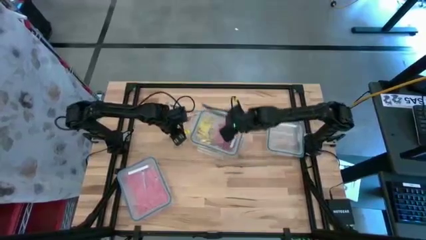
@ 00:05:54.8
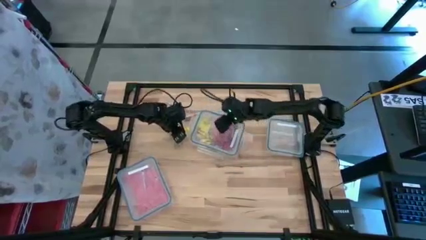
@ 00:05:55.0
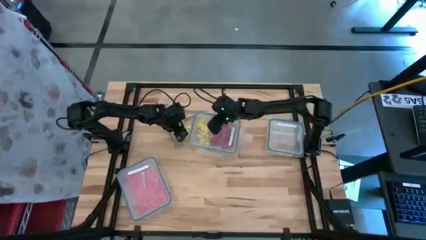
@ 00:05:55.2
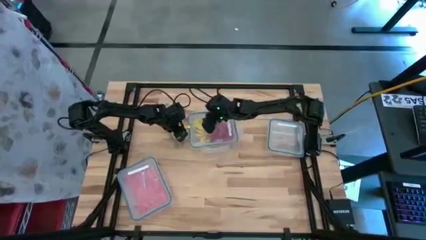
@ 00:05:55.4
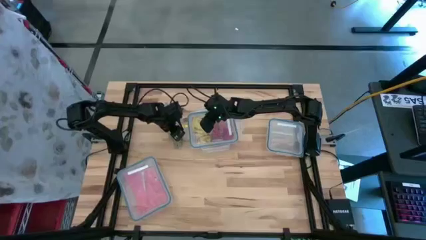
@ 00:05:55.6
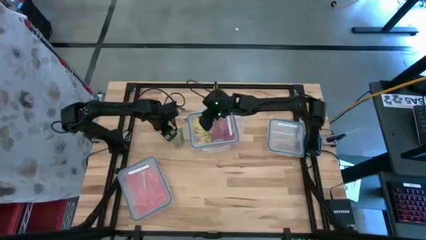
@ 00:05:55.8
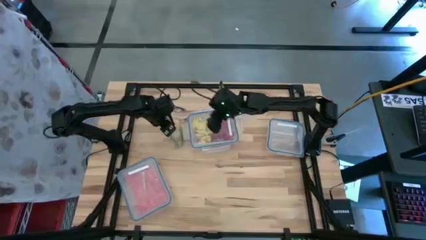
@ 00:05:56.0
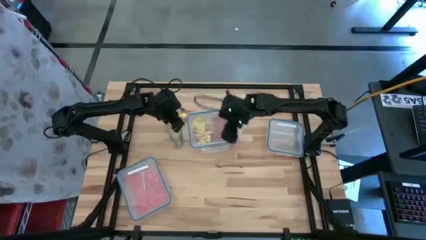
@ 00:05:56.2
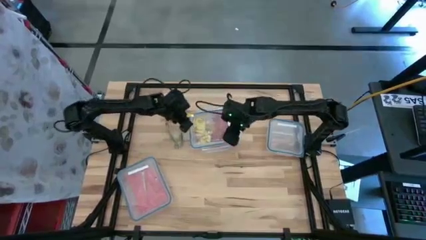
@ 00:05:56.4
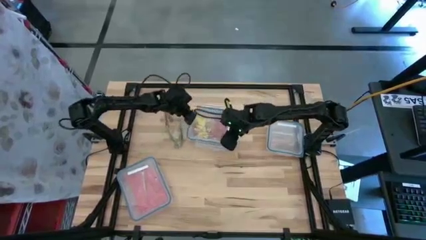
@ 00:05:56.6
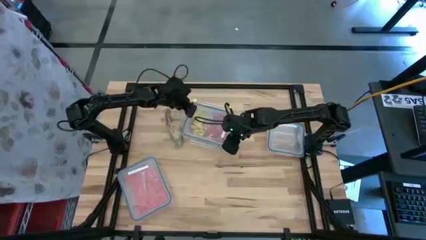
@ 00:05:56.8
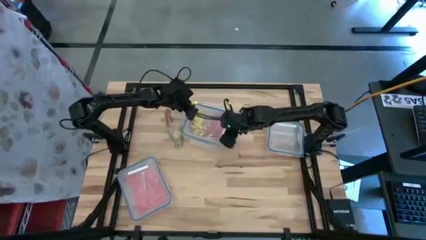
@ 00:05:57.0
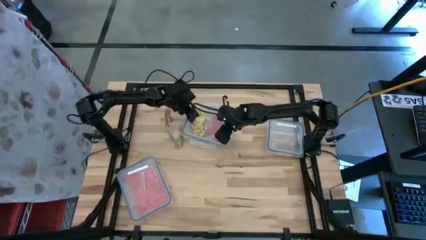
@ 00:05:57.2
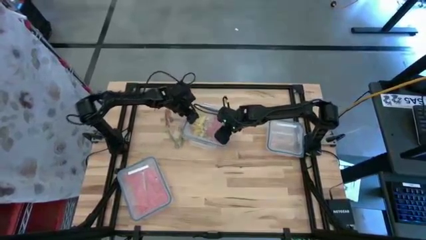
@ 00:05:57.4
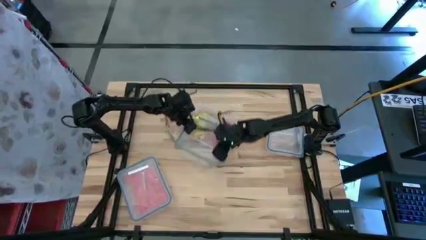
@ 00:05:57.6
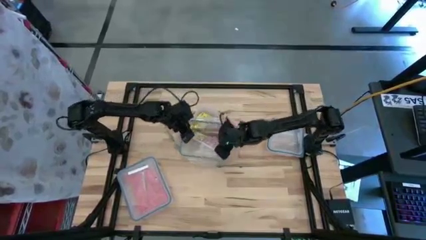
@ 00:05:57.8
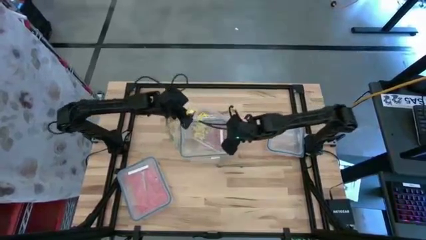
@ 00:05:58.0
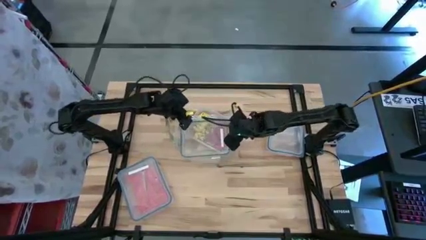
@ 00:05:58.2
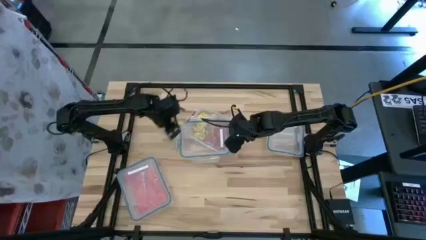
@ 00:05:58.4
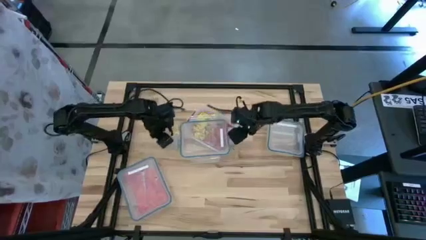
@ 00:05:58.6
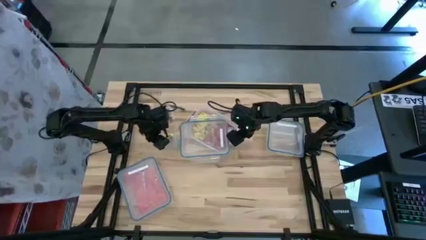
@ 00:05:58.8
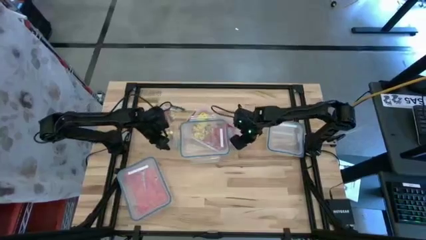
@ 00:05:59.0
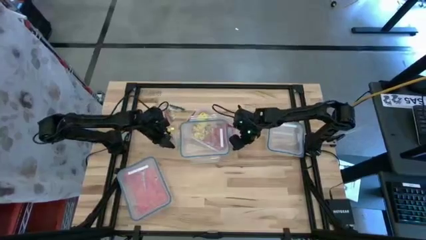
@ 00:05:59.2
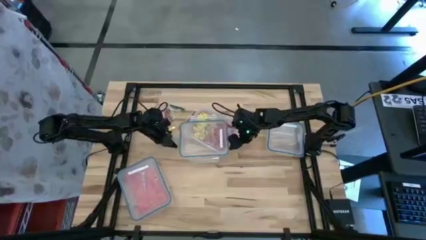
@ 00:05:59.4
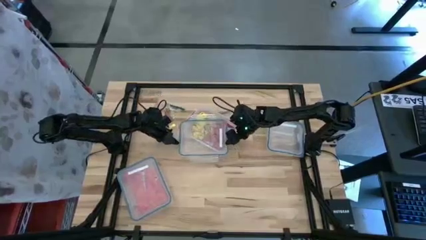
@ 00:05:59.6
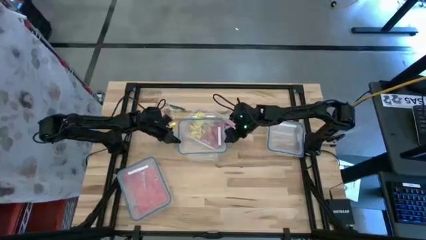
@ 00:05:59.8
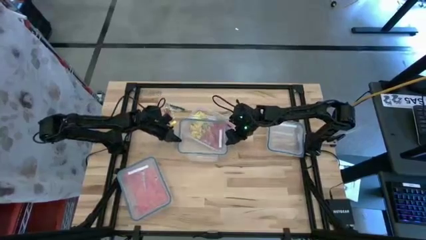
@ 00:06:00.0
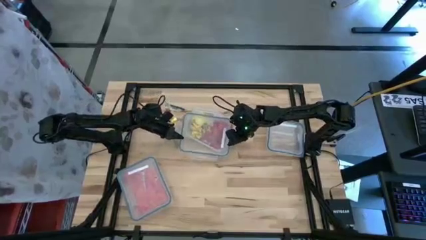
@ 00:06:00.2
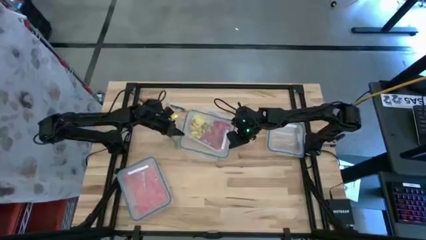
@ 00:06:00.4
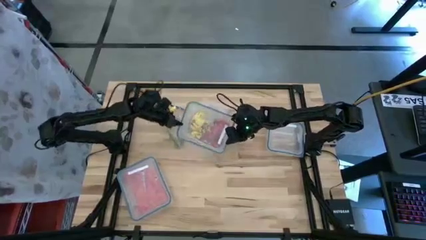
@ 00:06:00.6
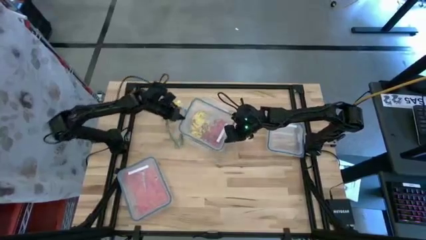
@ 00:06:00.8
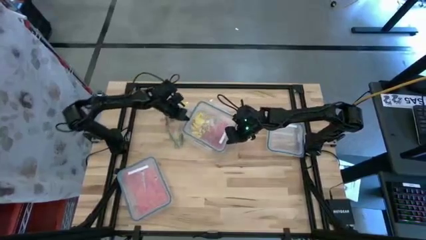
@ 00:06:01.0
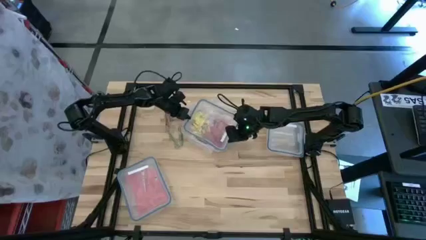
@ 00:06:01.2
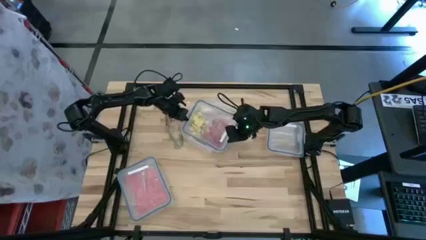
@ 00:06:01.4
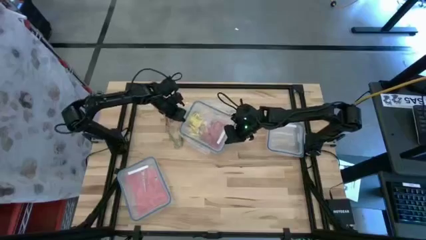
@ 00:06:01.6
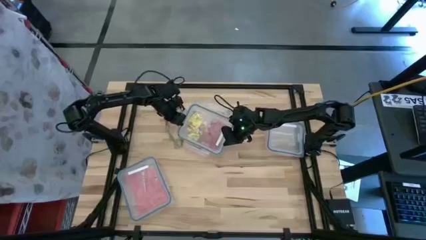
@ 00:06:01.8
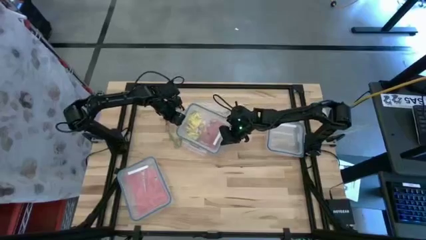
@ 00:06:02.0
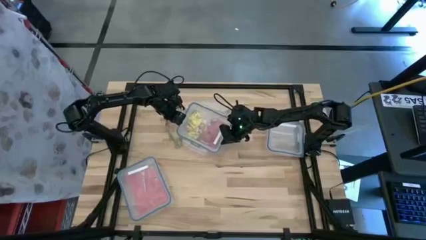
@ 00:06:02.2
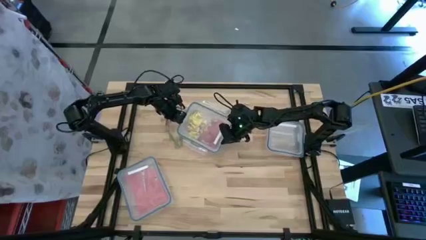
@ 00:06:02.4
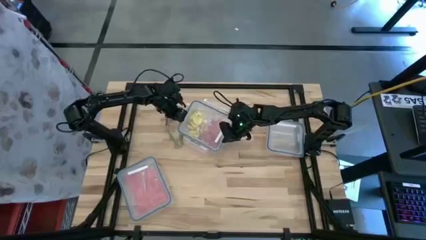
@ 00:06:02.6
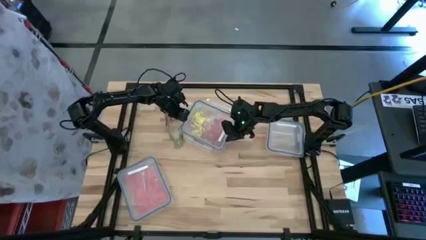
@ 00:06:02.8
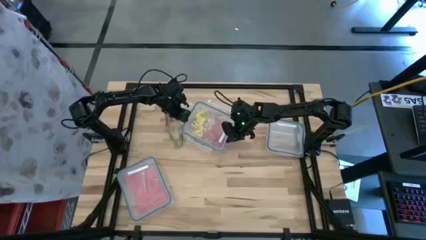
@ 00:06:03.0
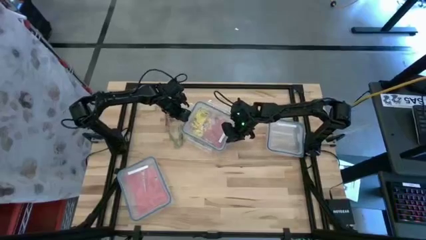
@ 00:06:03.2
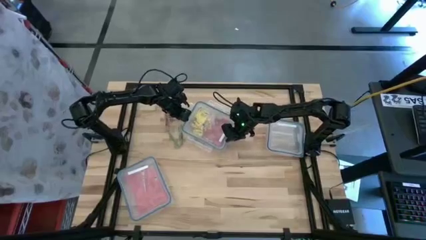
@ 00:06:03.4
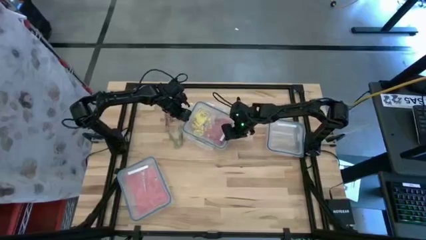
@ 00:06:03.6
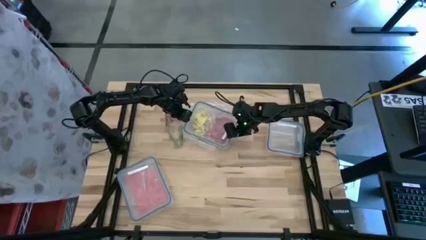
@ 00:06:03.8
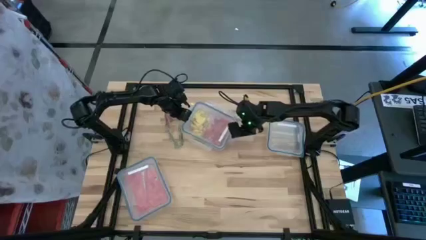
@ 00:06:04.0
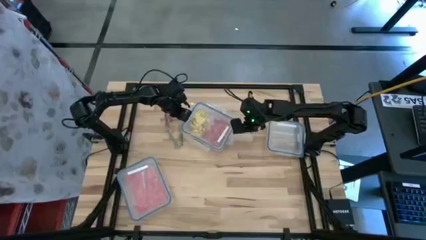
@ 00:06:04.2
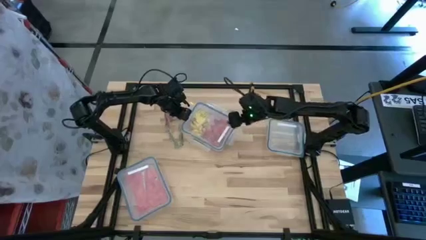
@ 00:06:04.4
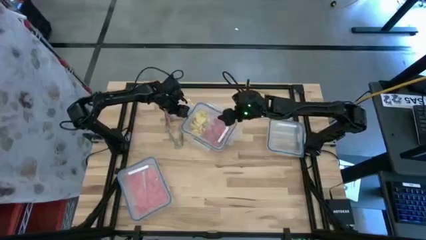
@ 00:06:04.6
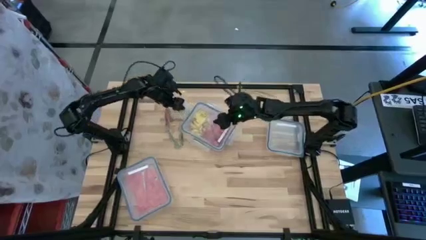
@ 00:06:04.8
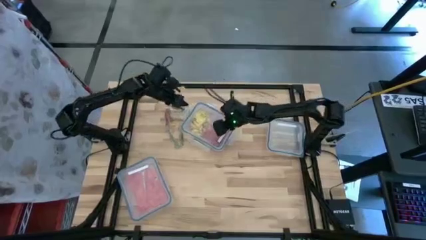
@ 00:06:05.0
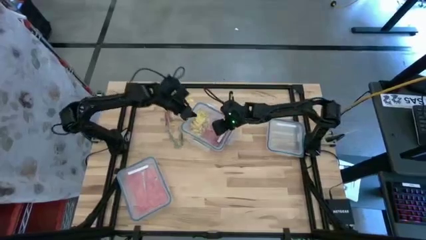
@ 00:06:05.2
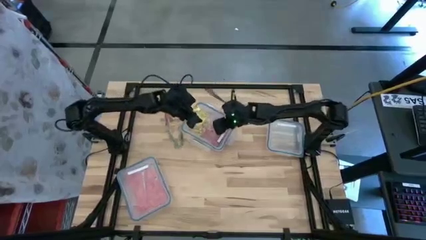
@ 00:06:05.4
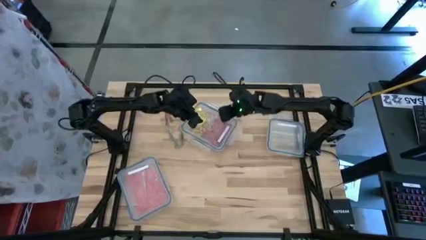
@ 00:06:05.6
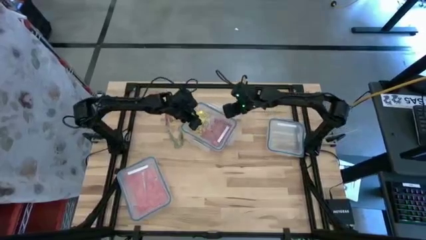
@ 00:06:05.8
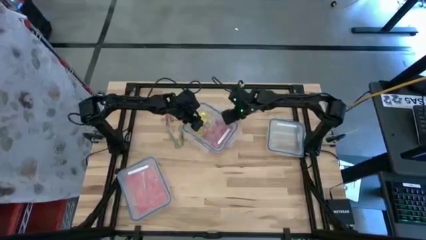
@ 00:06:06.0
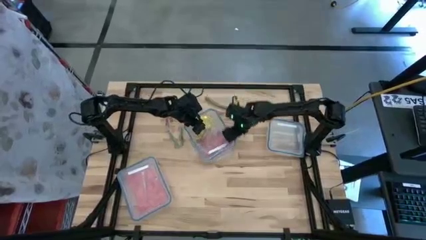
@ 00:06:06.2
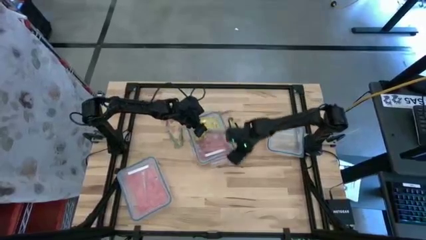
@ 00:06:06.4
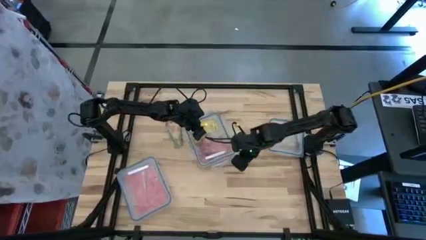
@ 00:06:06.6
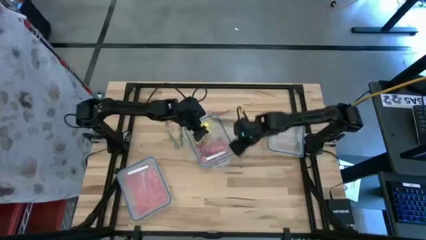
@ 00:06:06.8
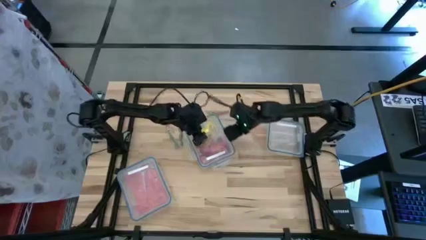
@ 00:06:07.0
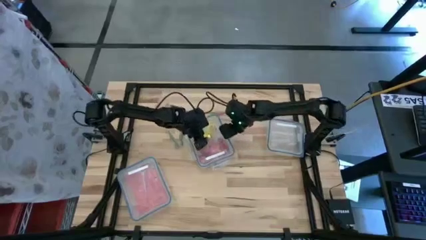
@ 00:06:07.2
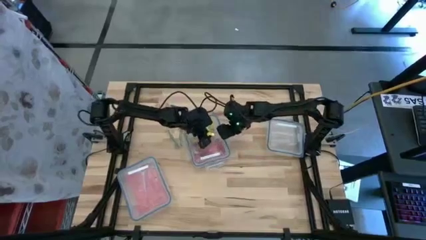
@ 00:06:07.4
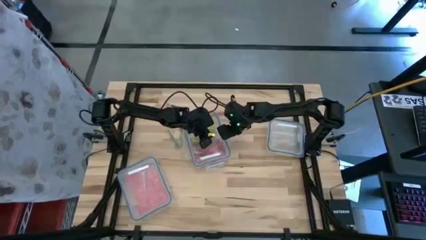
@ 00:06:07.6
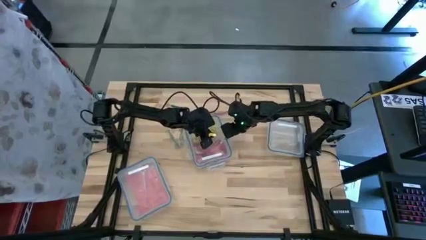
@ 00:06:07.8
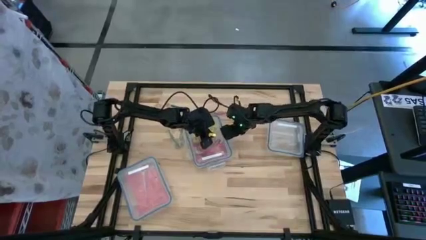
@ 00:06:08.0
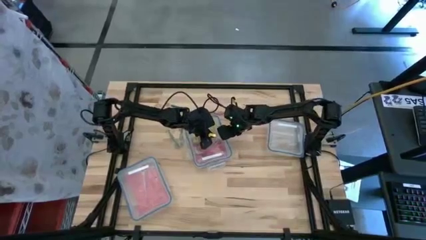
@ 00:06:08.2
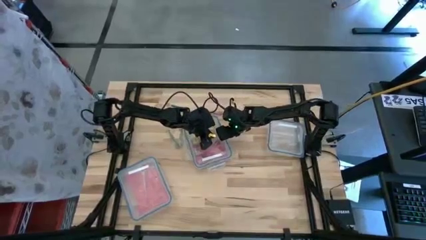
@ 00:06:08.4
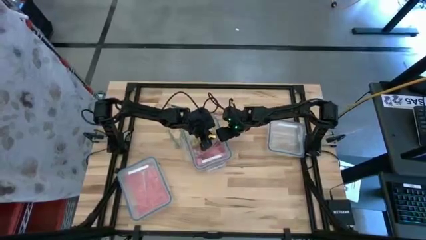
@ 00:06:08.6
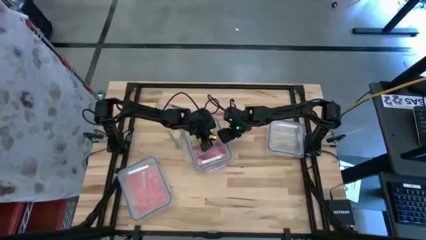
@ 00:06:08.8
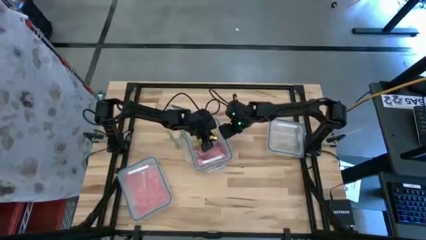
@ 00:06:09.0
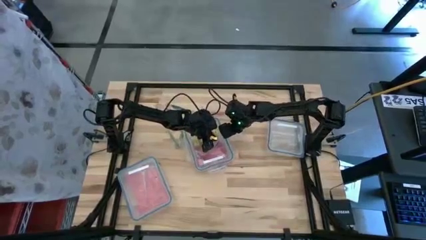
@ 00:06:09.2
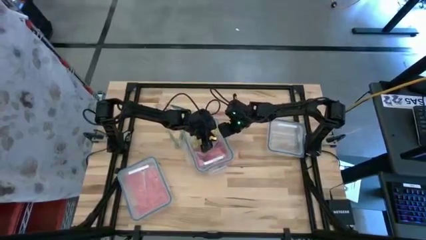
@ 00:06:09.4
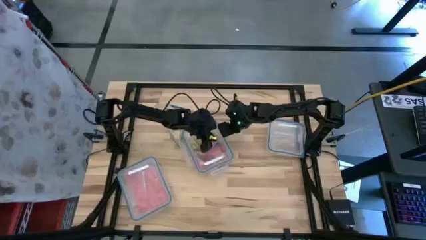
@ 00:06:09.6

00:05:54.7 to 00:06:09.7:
Task: Sort candy
Close the rectangular transparent bin
